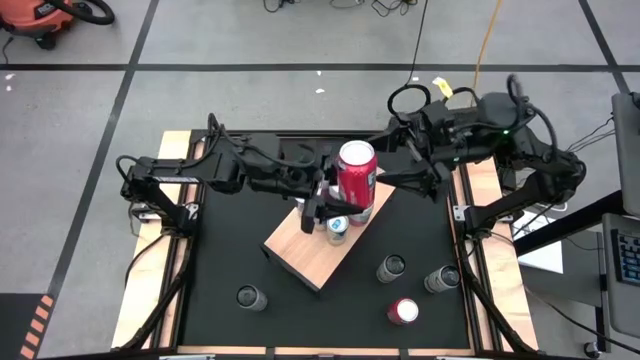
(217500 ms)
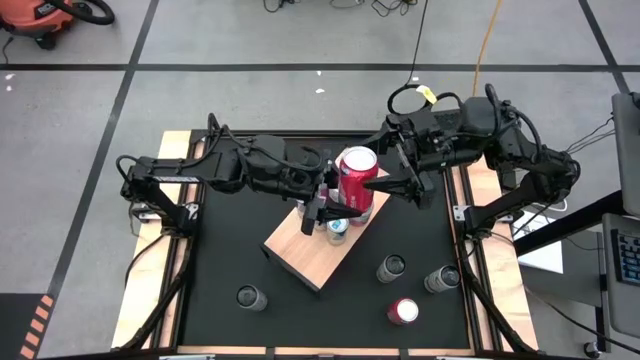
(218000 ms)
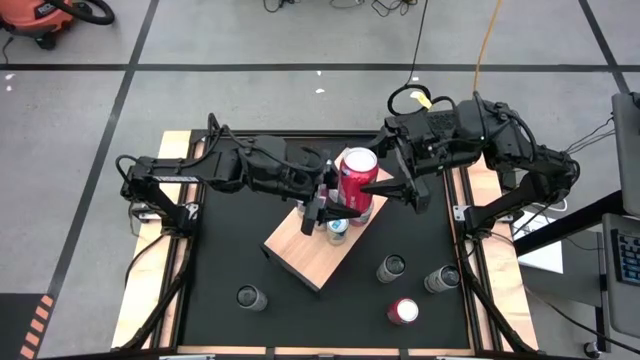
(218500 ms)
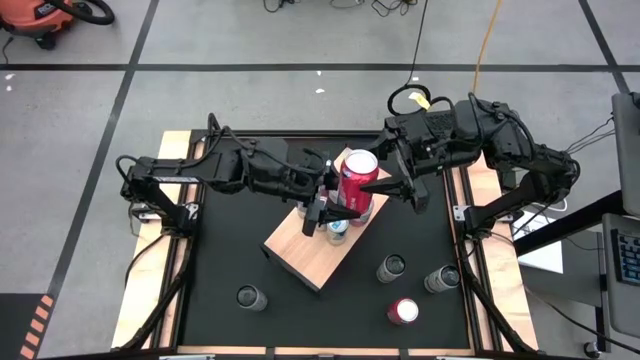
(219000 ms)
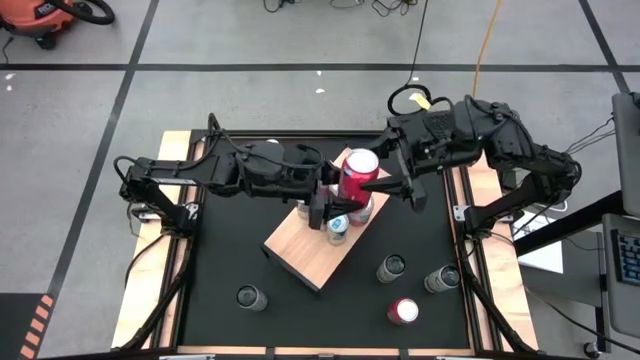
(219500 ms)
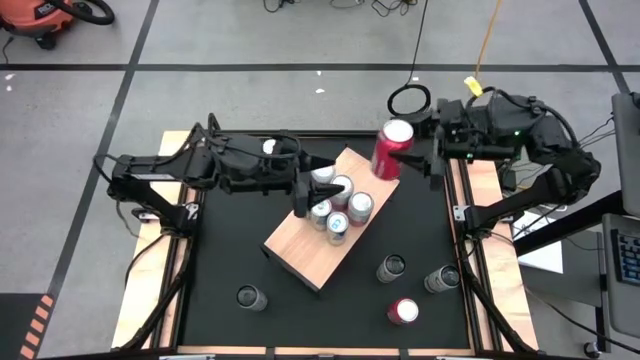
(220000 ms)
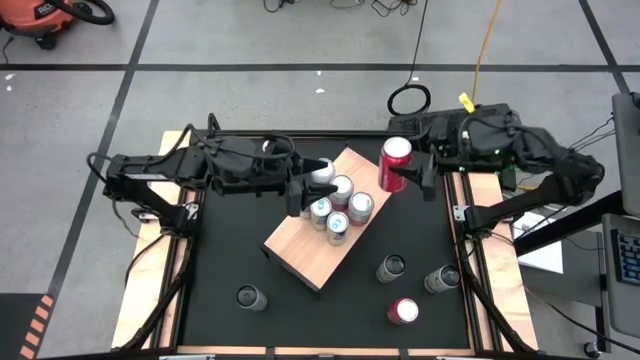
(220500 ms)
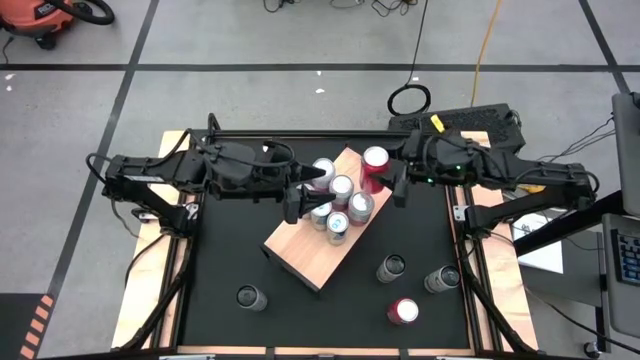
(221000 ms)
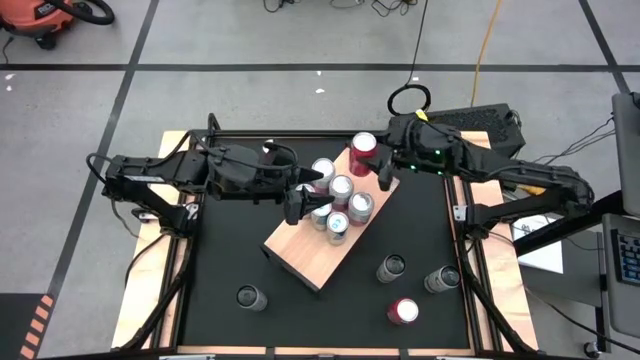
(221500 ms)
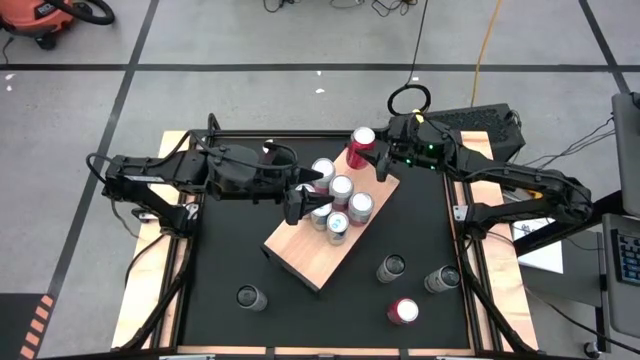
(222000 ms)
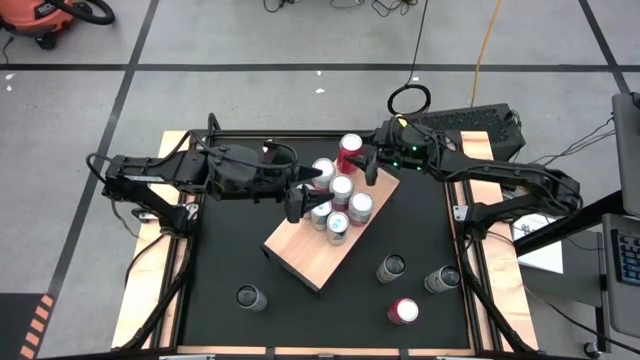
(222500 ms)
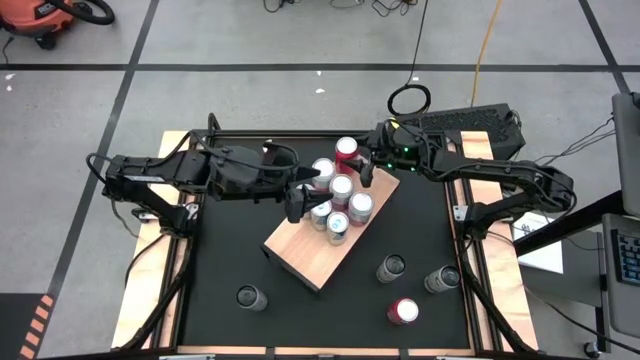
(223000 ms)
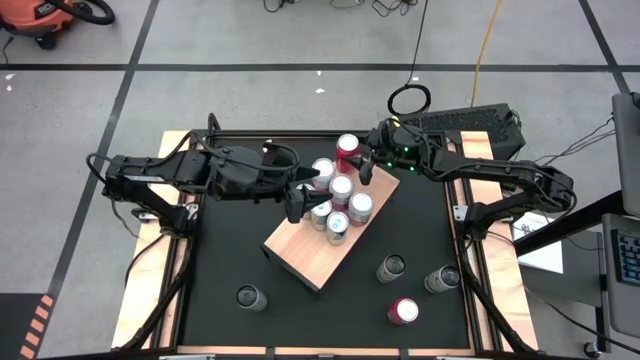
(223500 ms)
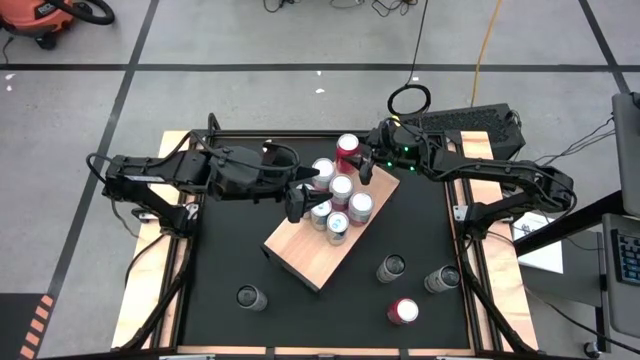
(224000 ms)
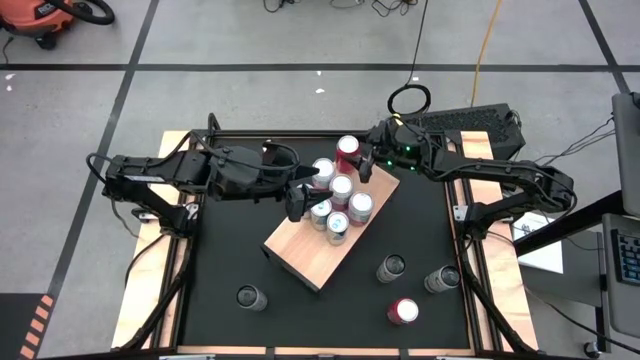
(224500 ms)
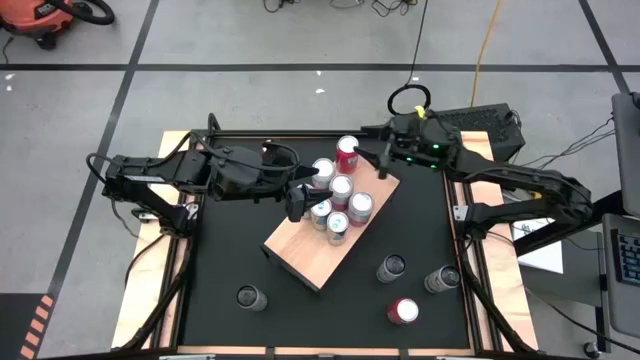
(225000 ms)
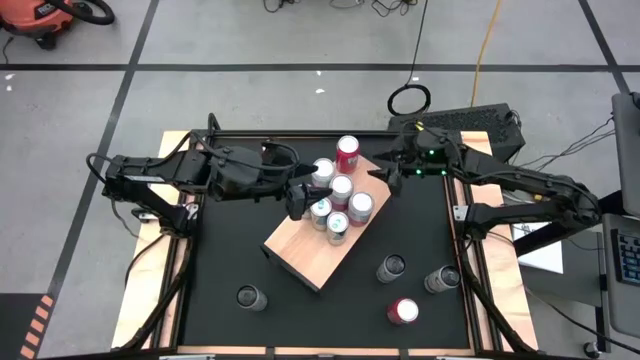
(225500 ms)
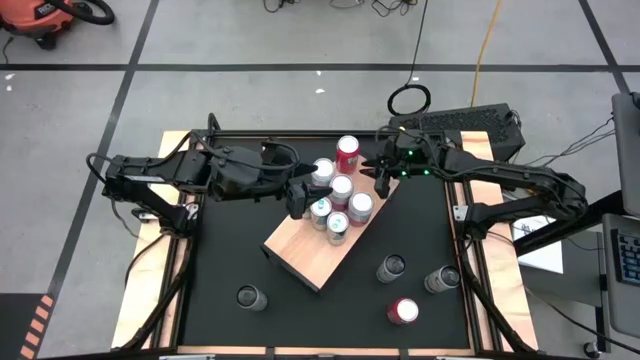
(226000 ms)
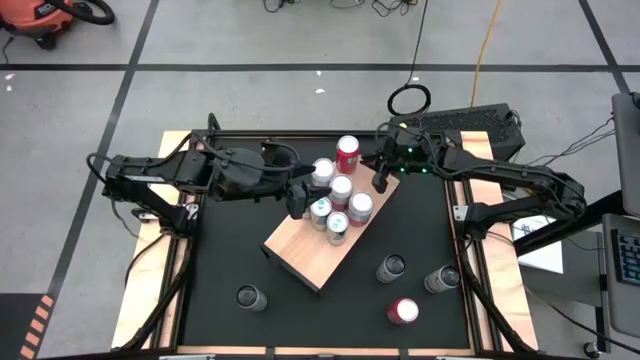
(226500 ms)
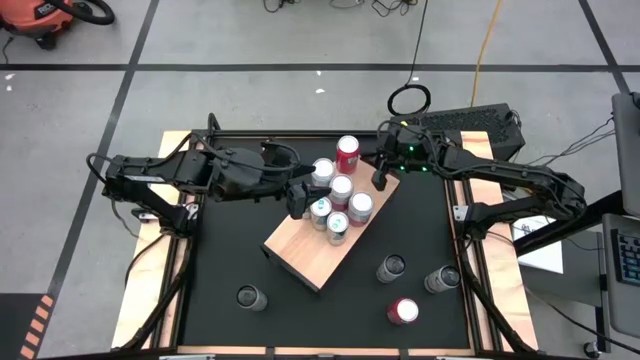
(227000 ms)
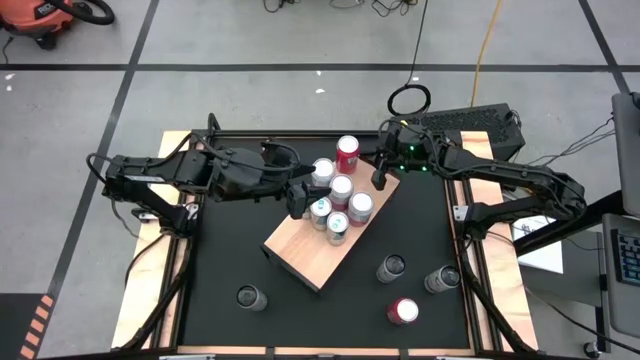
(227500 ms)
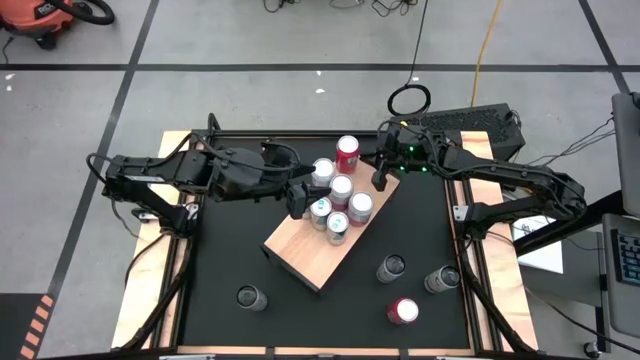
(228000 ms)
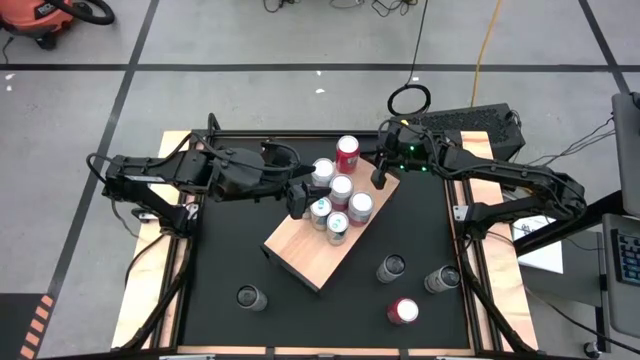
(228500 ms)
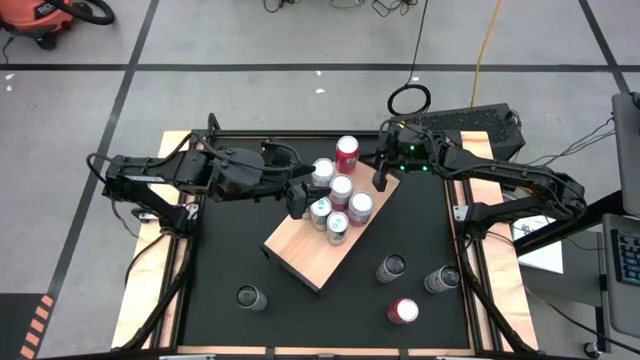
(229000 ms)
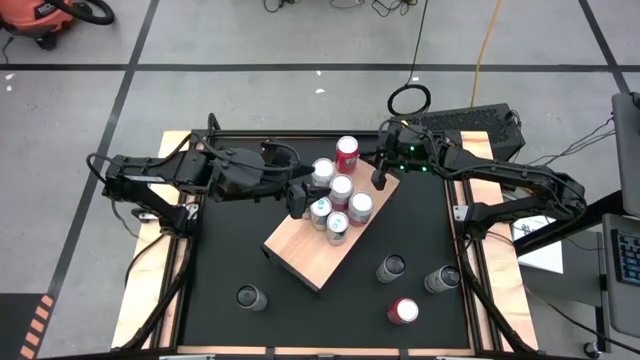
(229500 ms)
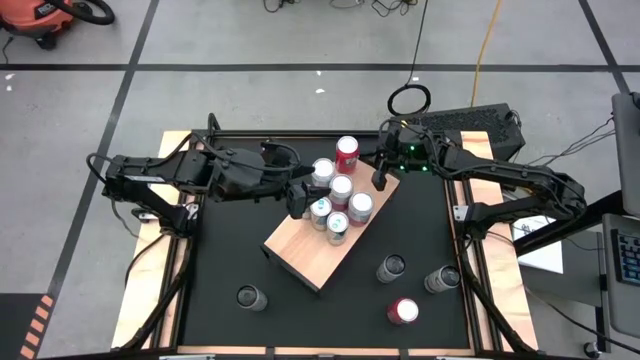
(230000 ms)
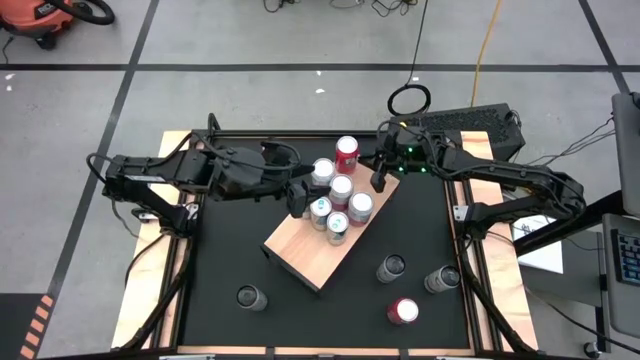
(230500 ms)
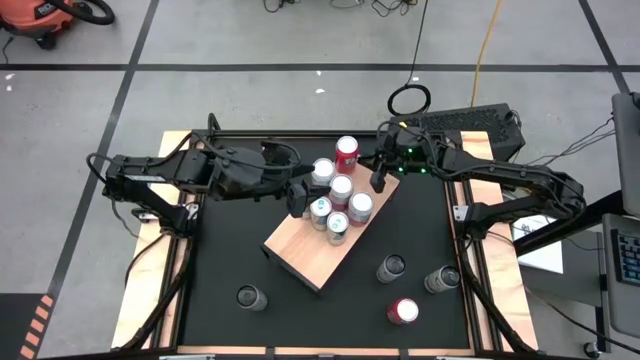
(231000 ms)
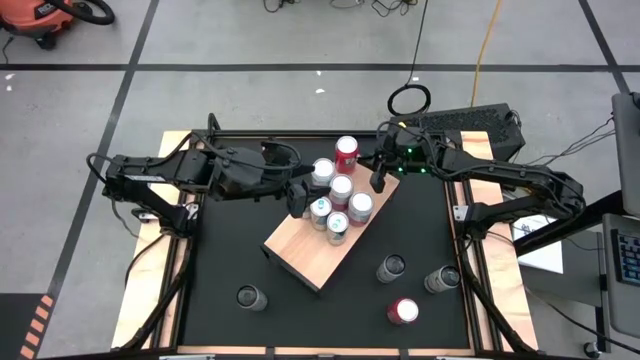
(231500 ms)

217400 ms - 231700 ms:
Task: Place canned beverage on shelf
Put the middle red soda can on the shelf

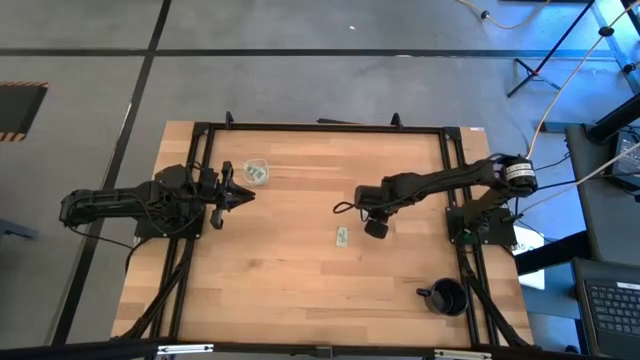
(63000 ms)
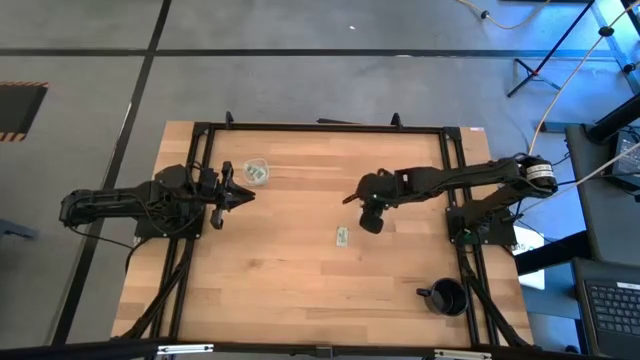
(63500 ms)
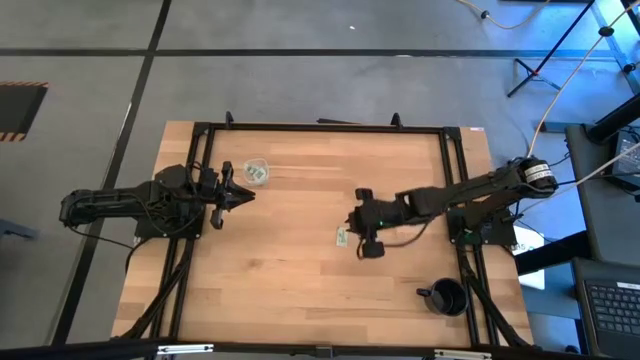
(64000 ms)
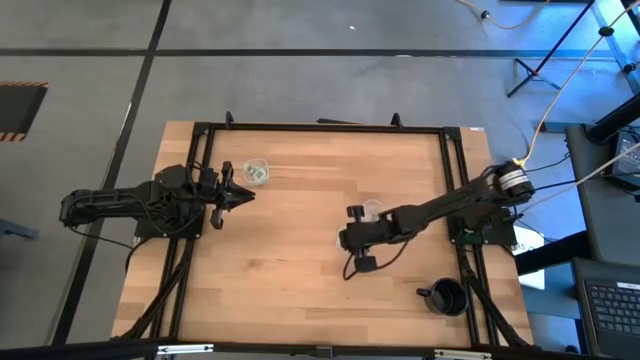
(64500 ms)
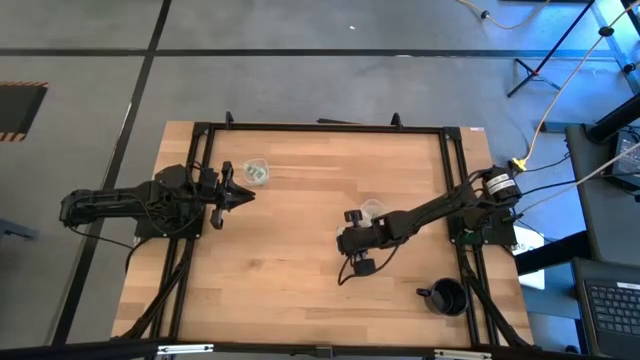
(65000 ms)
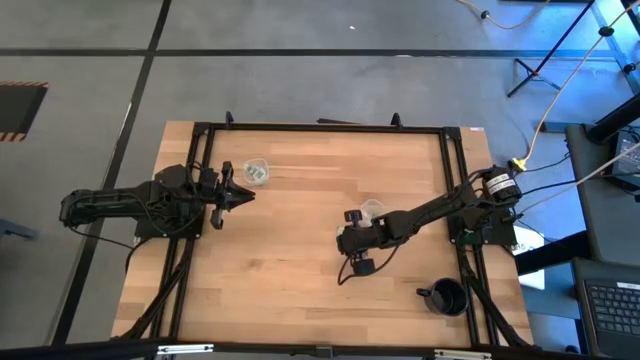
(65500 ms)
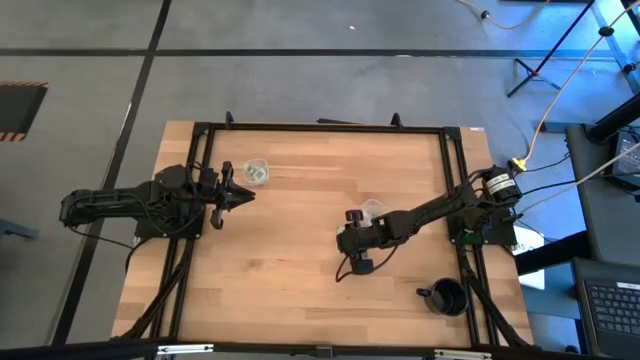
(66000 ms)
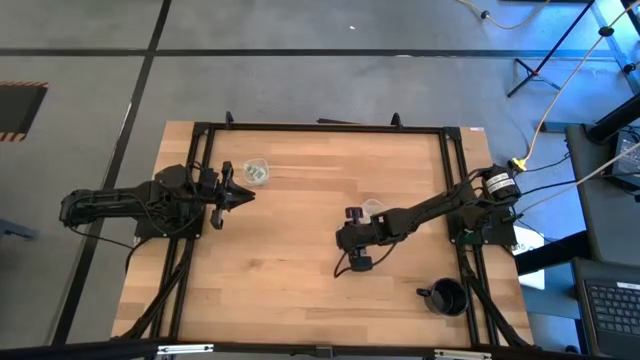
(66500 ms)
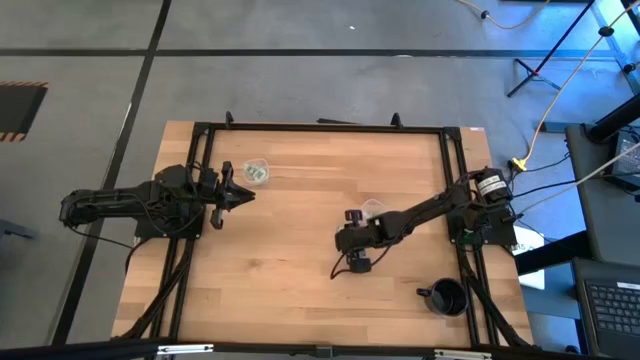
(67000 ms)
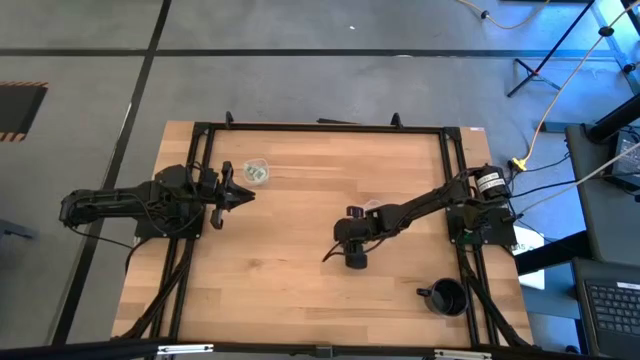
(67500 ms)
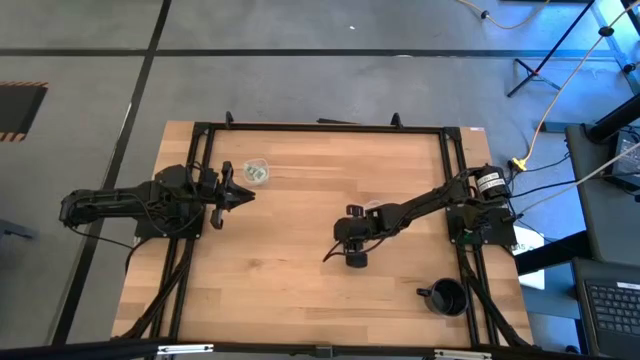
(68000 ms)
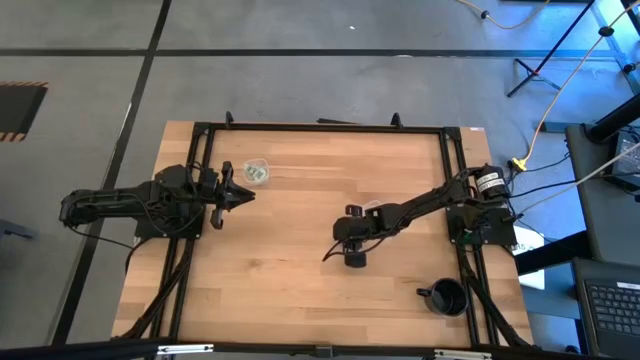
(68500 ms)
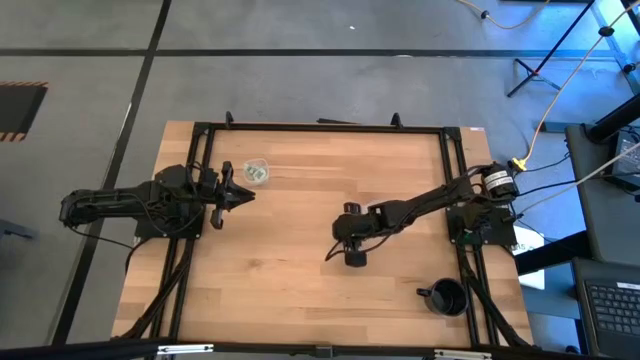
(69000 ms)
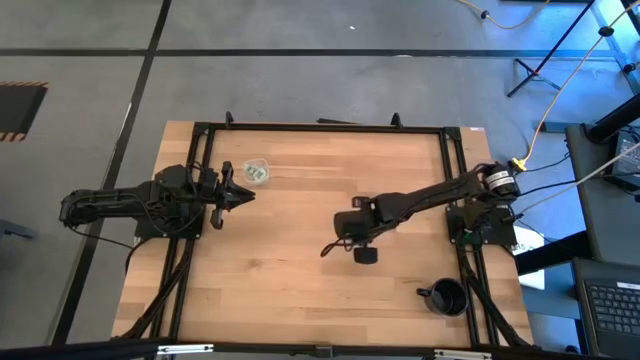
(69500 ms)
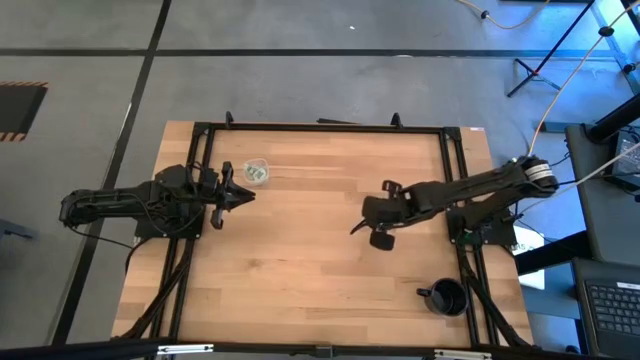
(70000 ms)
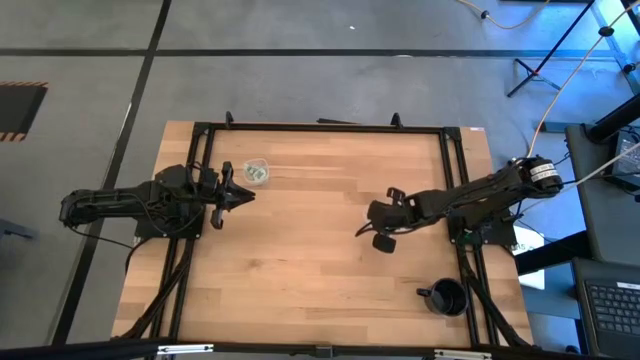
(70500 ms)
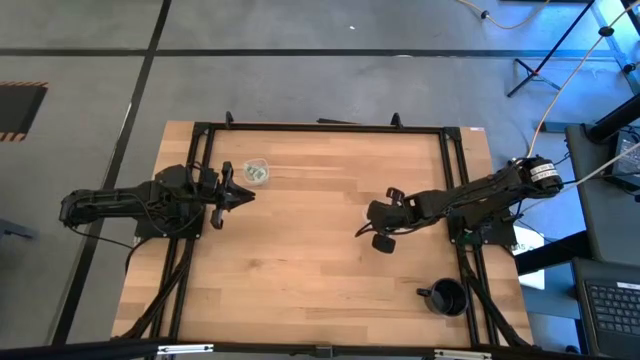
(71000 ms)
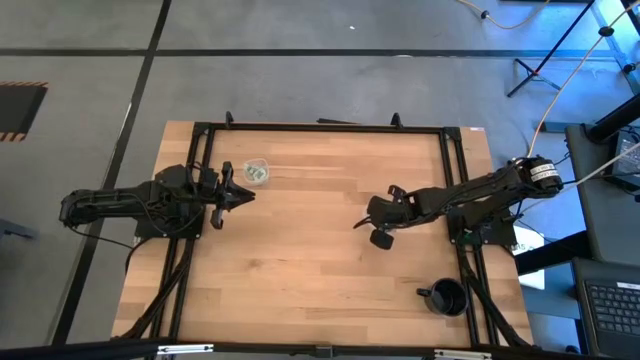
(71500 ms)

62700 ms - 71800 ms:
Task: Pick and place Stevia / Truvia into bins
Put the green stevia packet into the right white container
